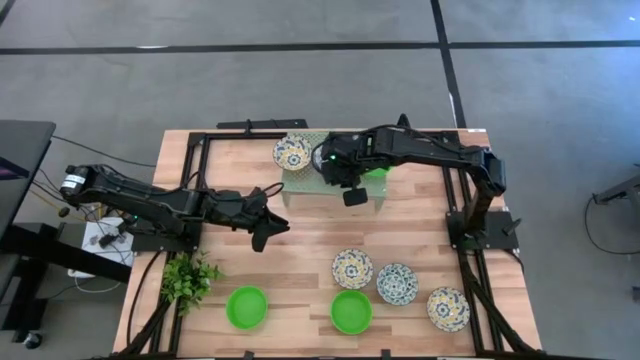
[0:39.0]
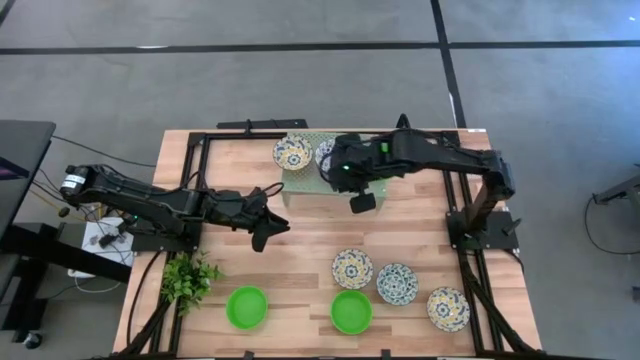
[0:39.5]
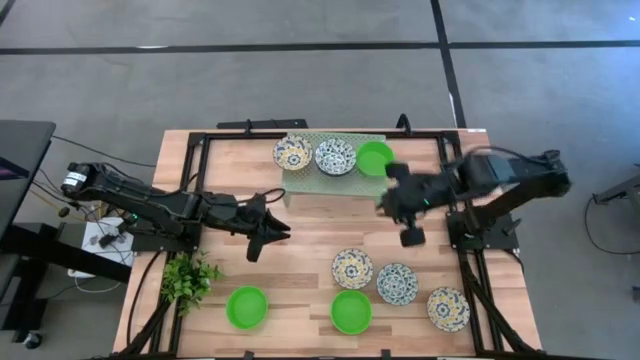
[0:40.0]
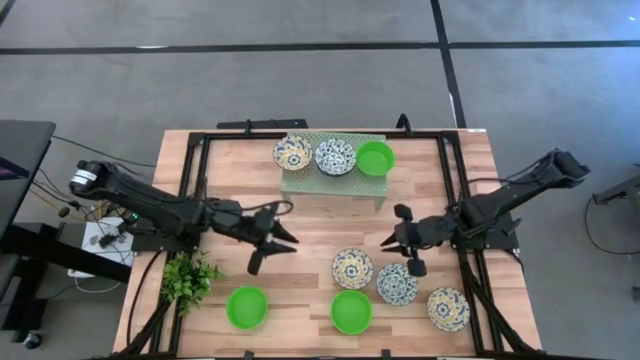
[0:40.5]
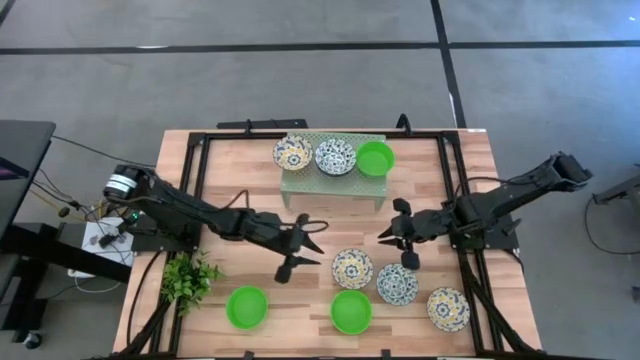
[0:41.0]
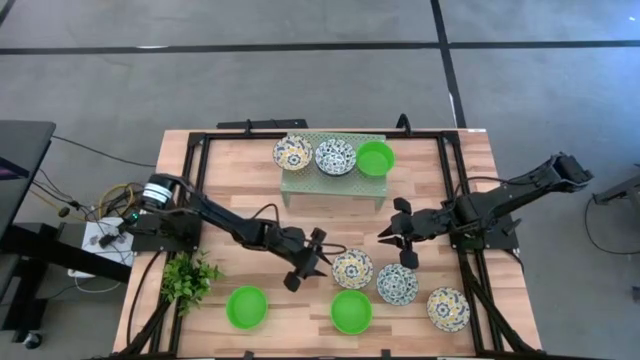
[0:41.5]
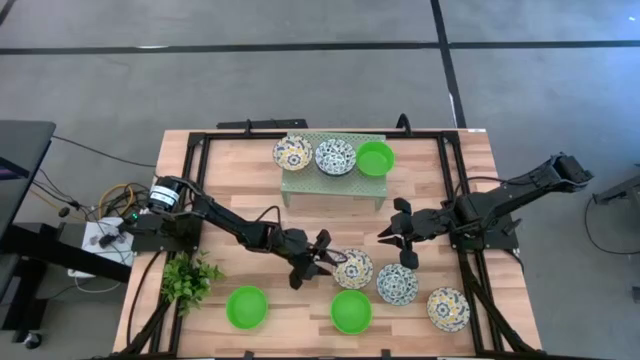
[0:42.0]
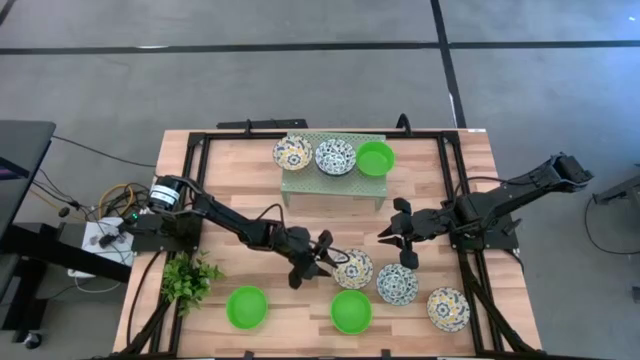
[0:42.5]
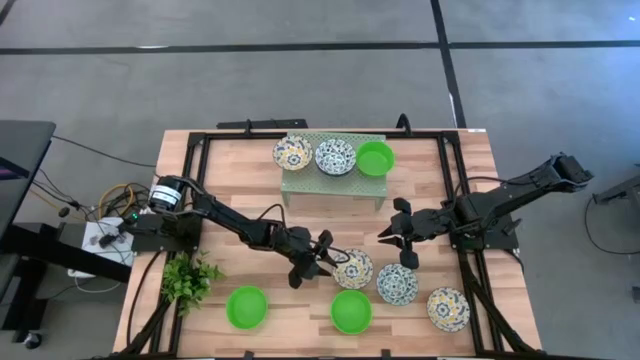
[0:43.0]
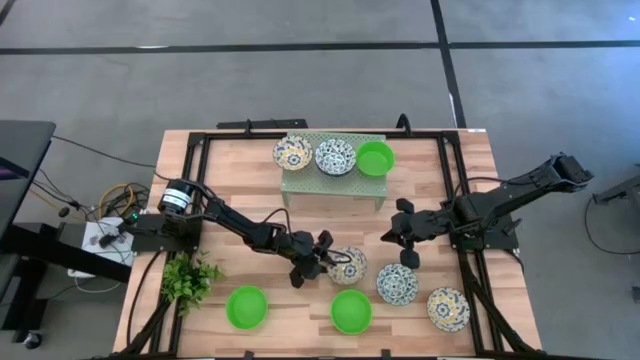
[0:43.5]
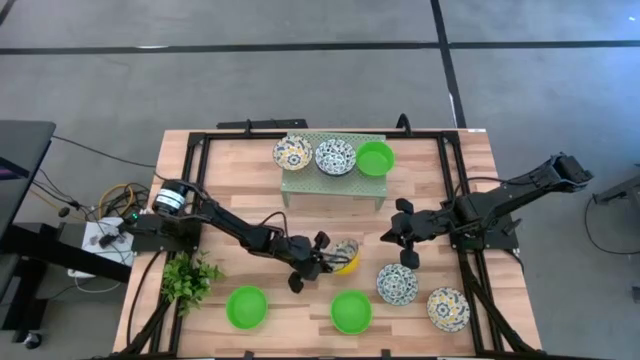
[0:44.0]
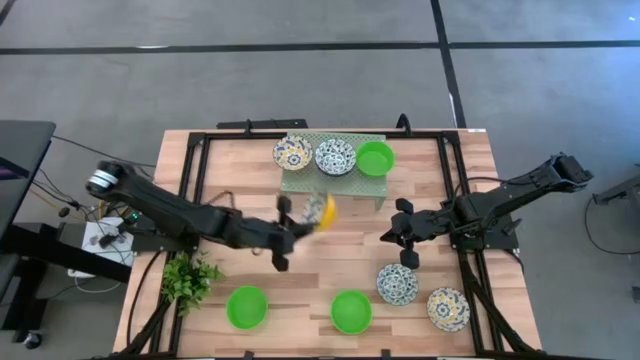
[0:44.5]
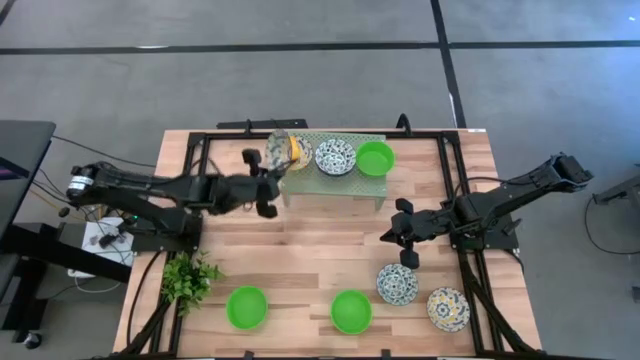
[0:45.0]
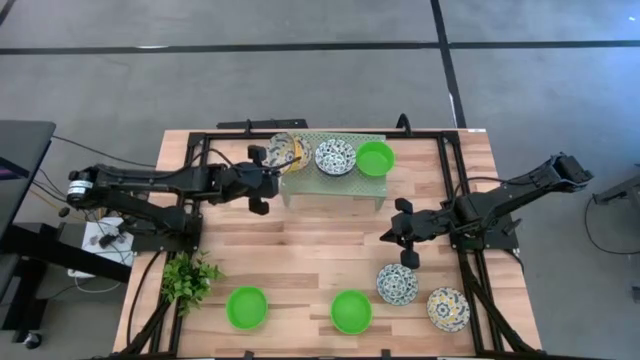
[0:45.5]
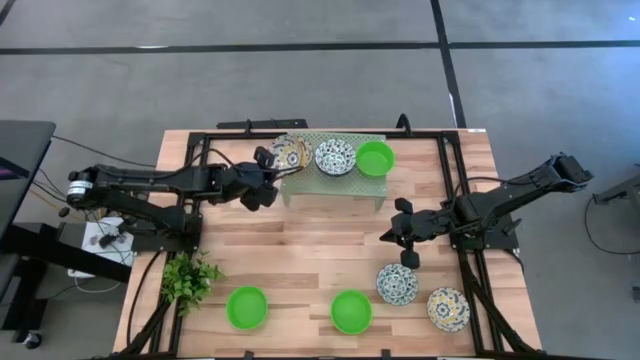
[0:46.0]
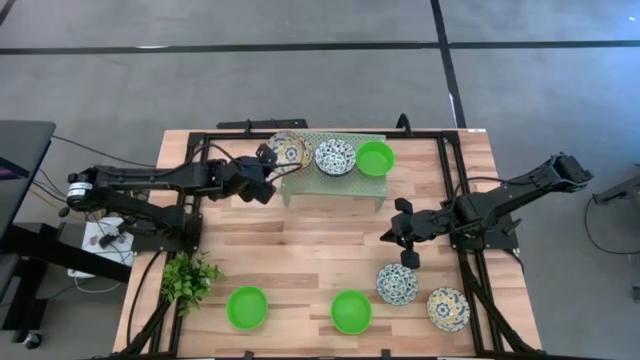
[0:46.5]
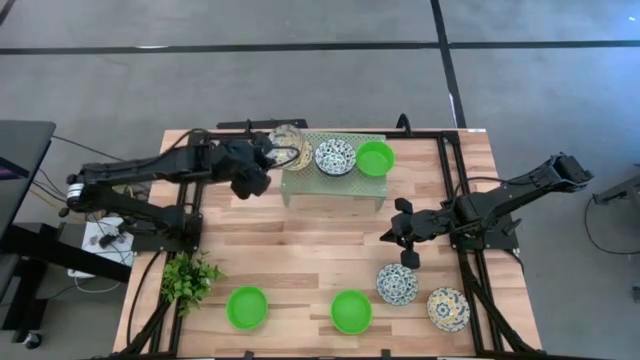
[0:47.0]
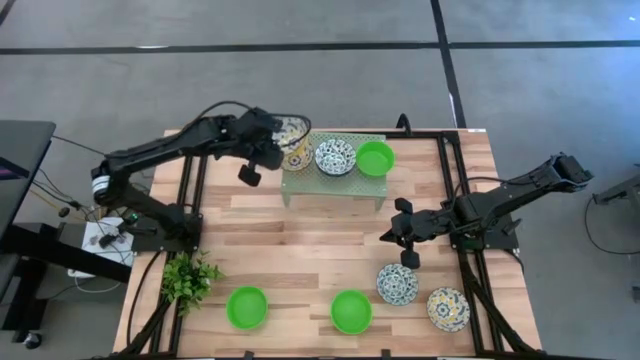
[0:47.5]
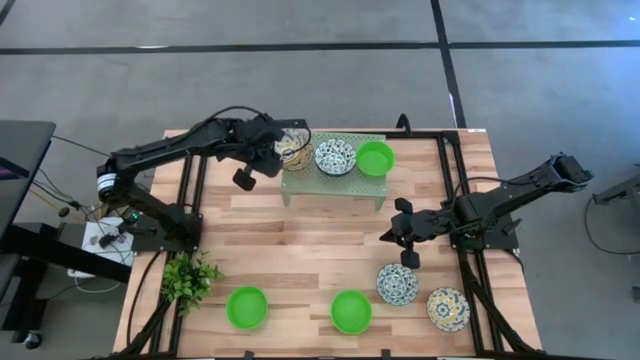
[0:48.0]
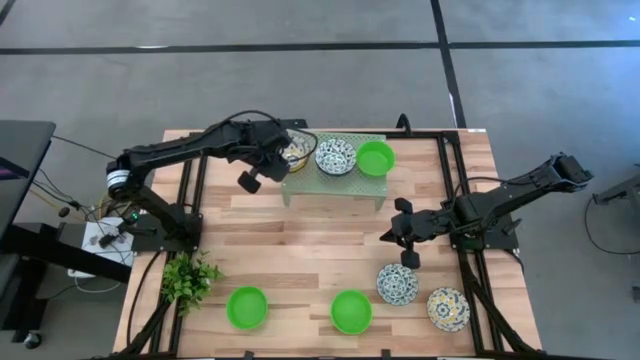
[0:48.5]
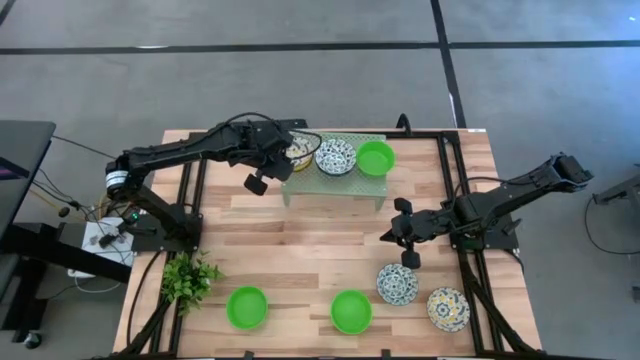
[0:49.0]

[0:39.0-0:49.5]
Task: Pick & Place Mini bowls
Stack the yellow patterned bowl on the yellow patterned bowl on the shelf

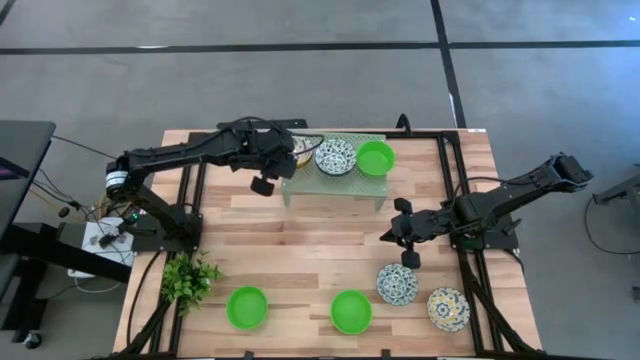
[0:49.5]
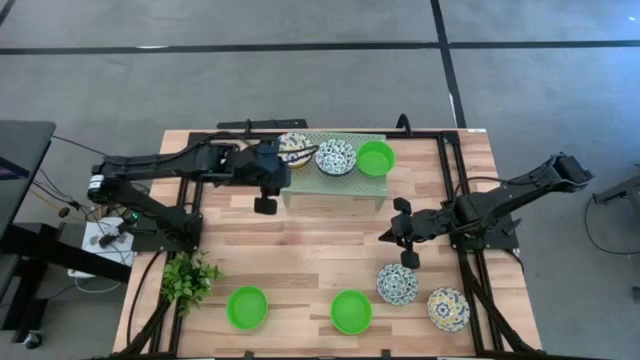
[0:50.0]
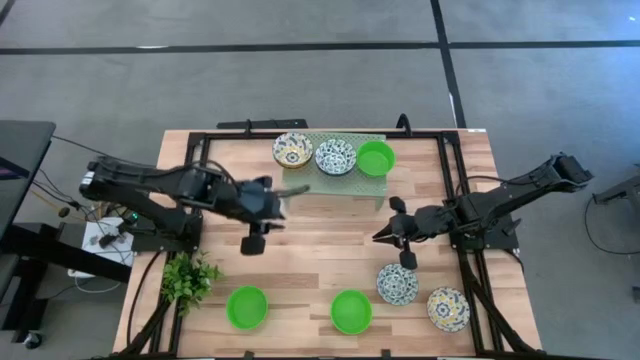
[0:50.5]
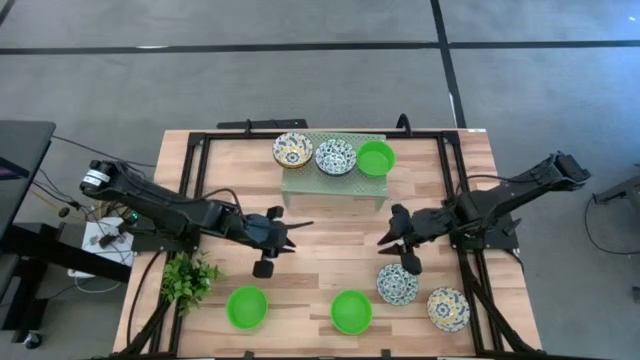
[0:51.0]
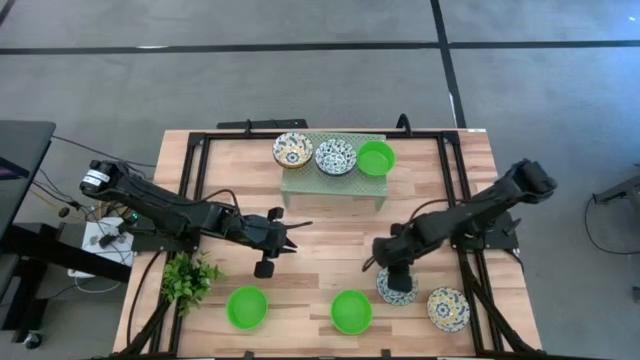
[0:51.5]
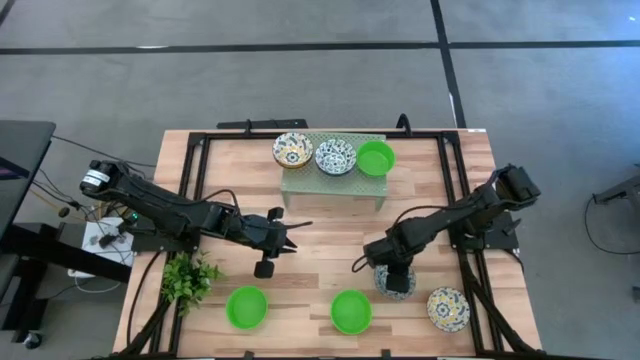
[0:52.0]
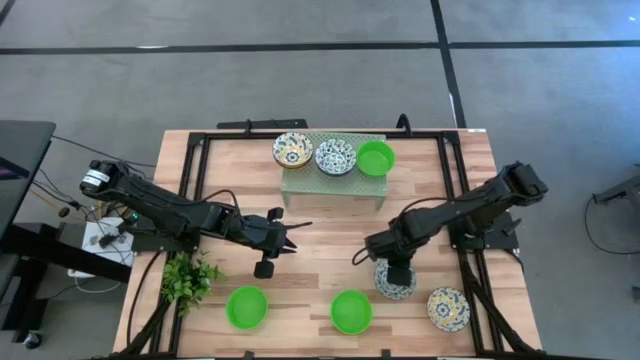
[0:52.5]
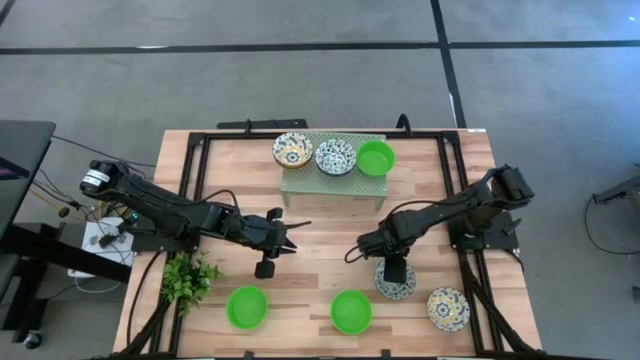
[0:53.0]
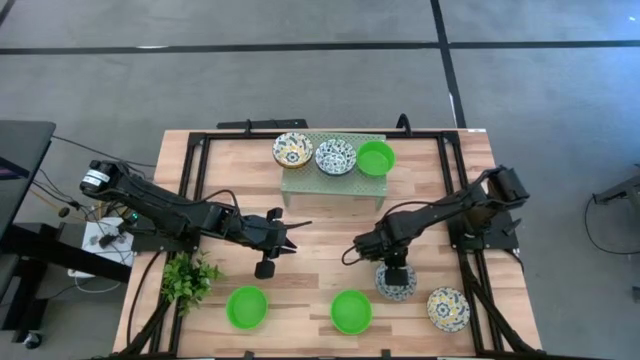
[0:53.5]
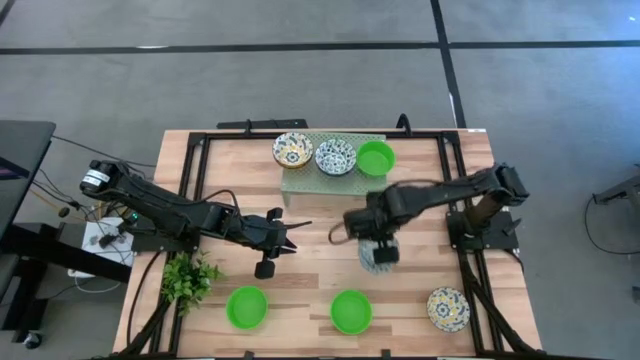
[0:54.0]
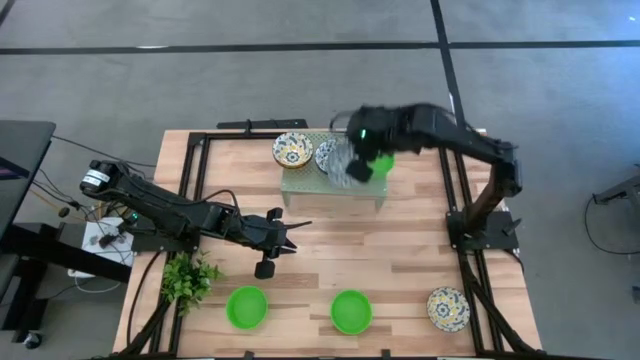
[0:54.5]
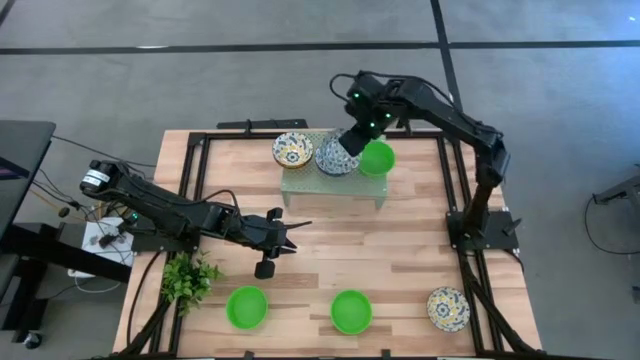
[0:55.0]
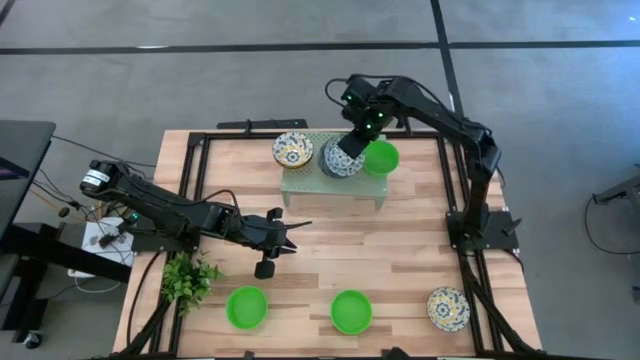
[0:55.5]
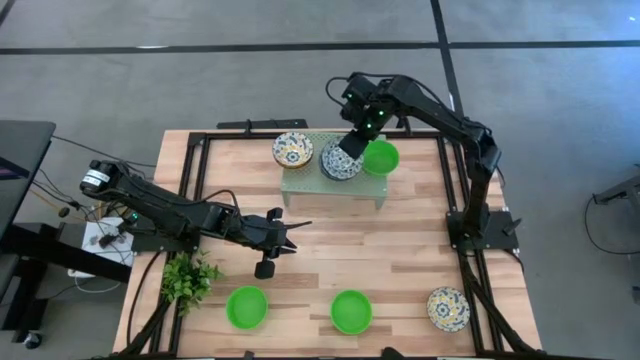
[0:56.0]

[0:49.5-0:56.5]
Stack the blue patterned bowl on the stacked blue patterned bowls on the shelf

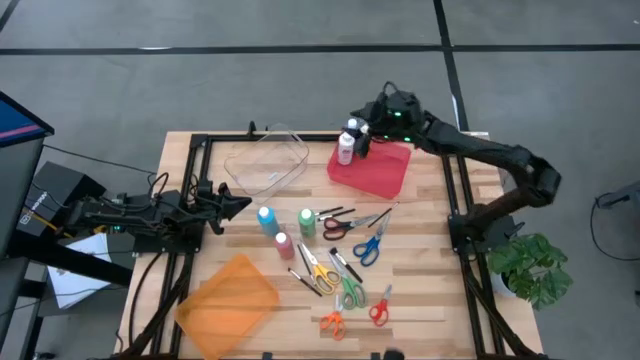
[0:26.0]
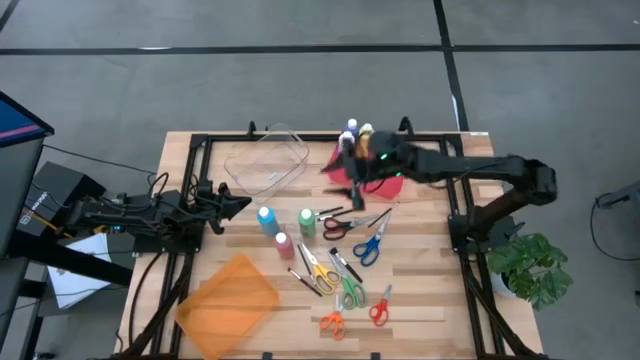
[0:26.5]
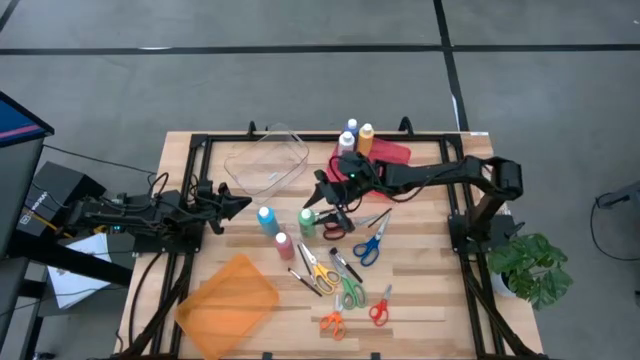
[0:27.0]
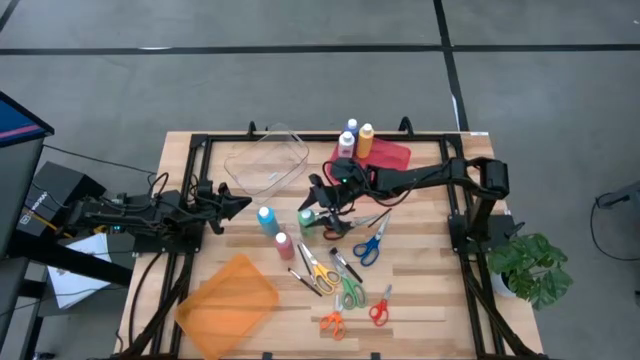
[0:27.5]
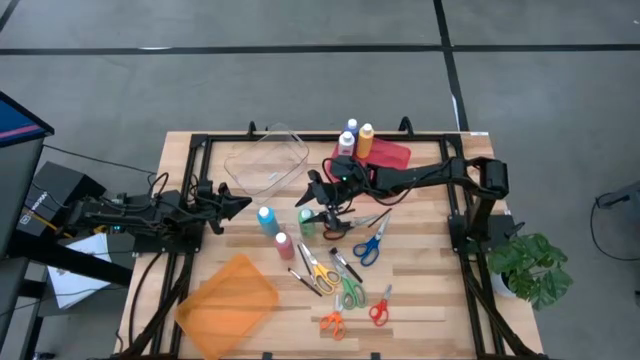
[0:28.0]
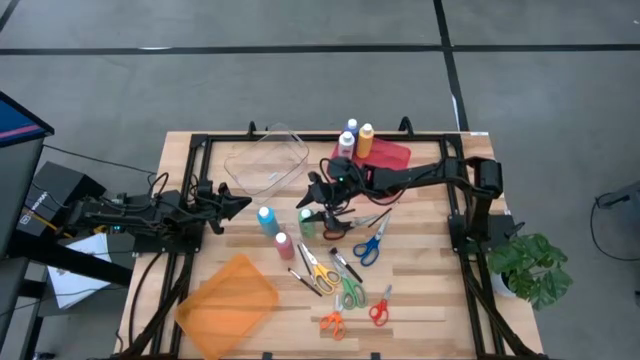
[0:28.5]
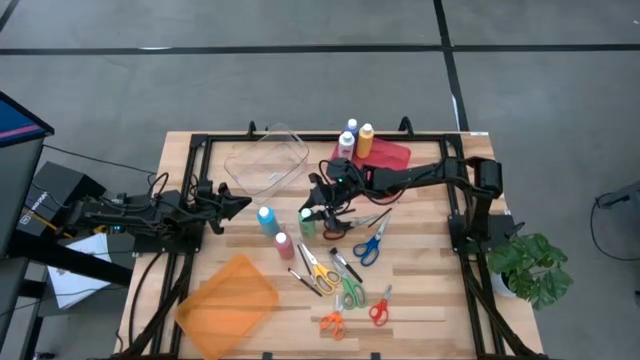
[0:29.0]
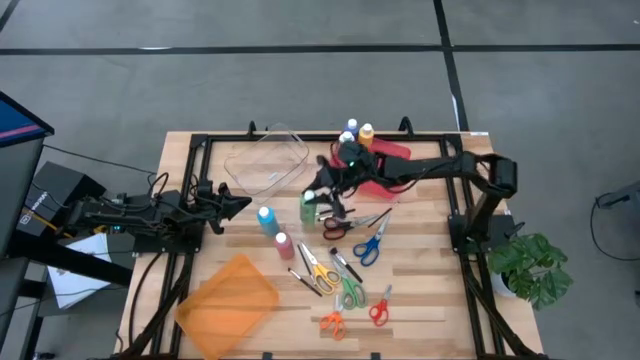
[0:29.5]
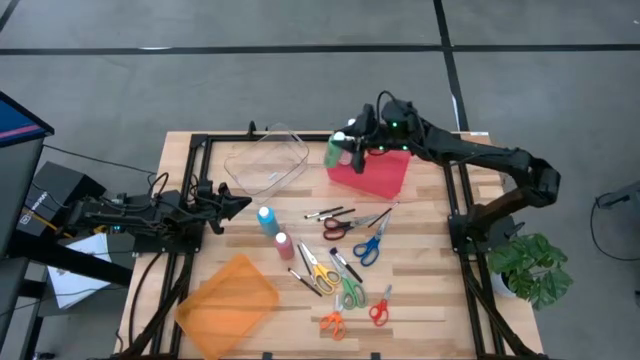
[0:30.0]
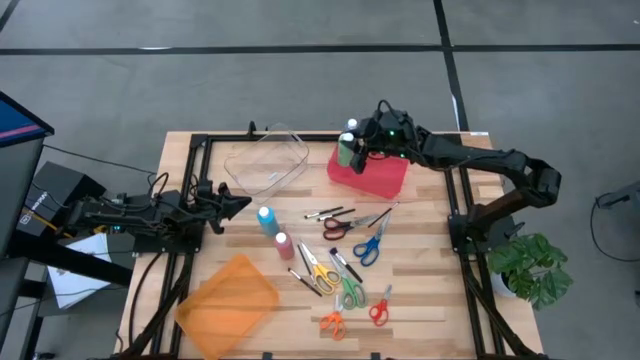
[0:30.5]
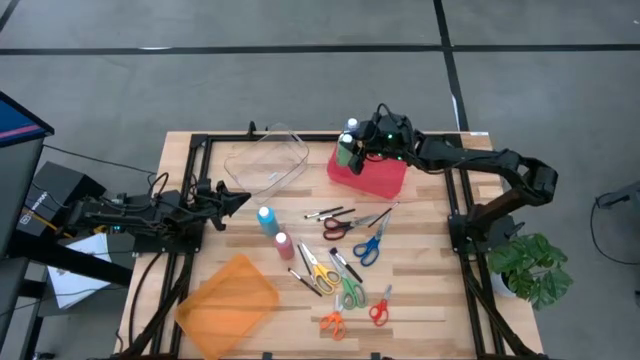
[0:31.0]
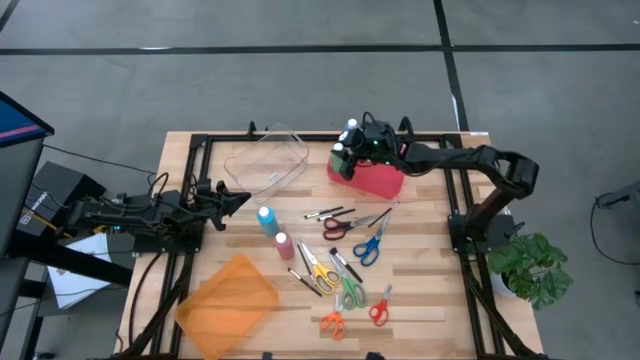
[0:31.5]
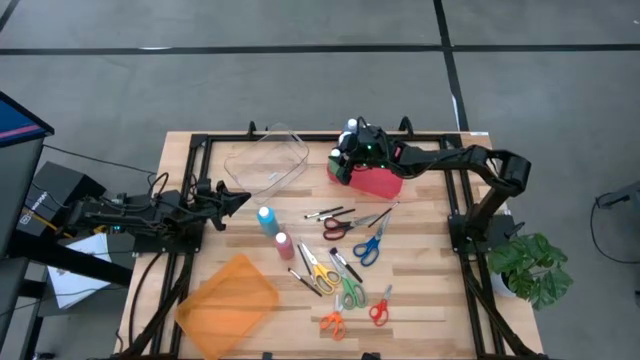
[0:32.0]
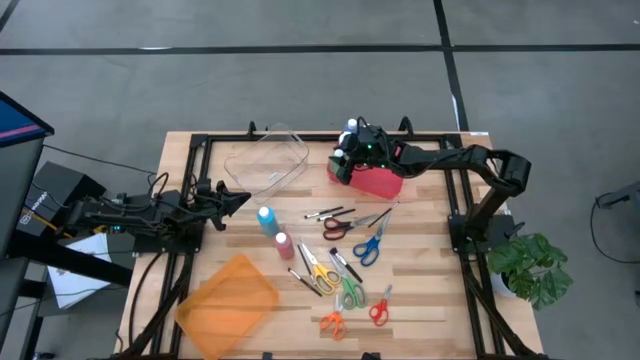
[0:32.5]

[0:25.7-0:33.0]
Task: Pick & Place Paint Supplies
Put the green paint bottle into the red bin
